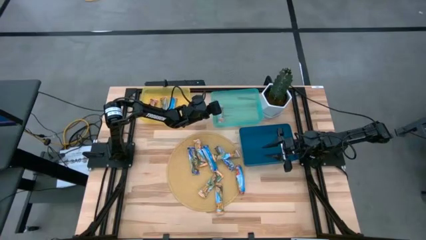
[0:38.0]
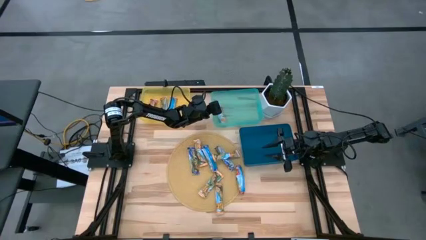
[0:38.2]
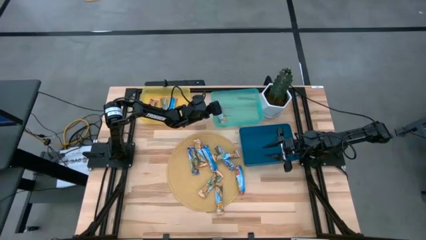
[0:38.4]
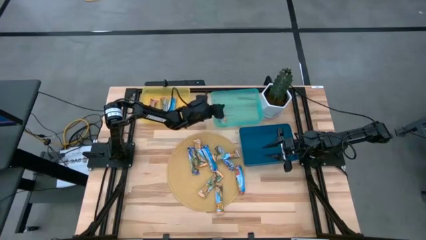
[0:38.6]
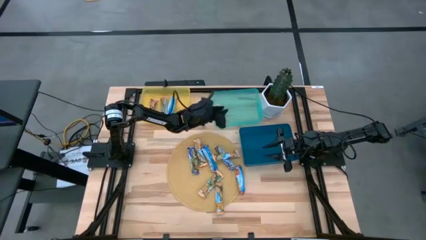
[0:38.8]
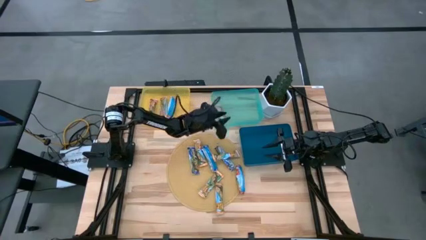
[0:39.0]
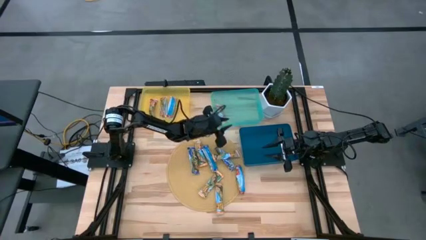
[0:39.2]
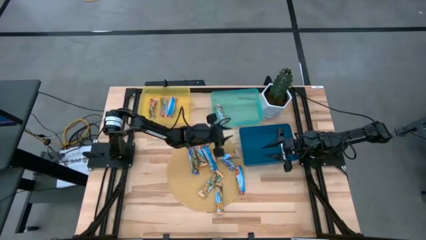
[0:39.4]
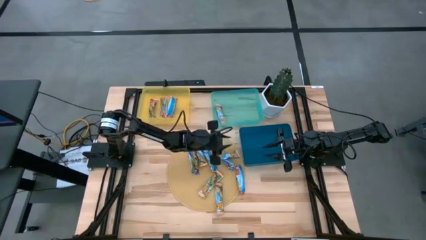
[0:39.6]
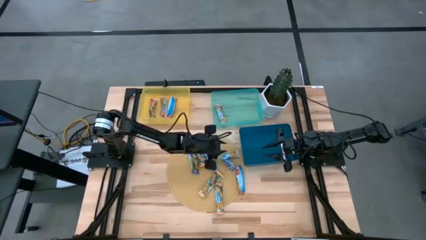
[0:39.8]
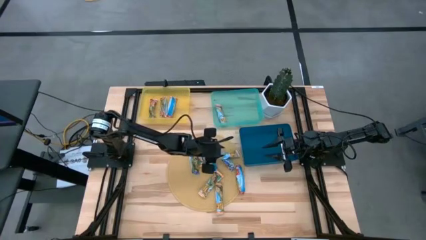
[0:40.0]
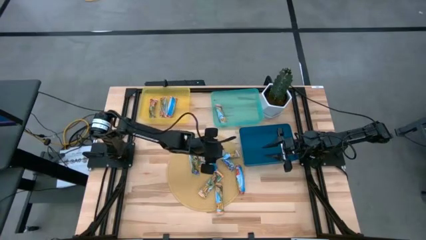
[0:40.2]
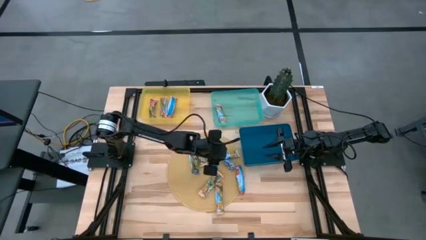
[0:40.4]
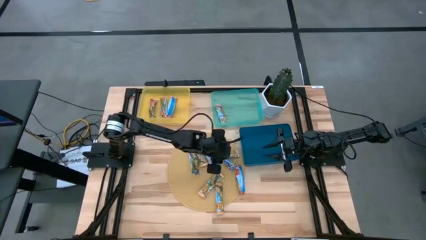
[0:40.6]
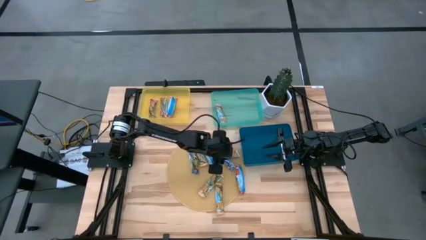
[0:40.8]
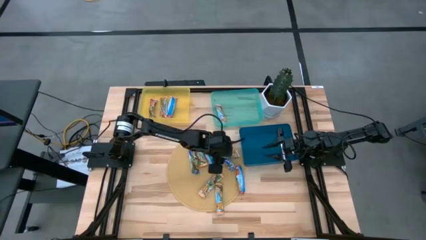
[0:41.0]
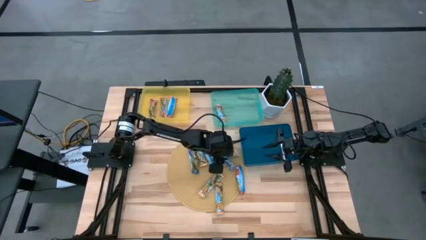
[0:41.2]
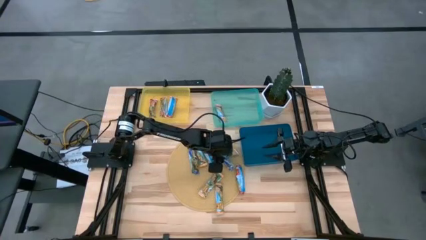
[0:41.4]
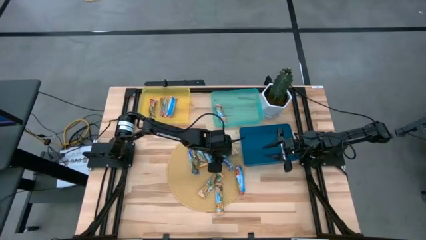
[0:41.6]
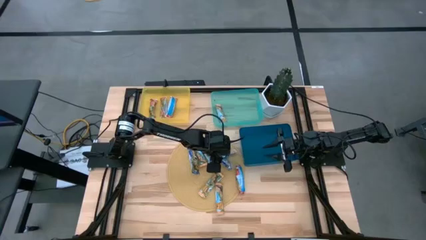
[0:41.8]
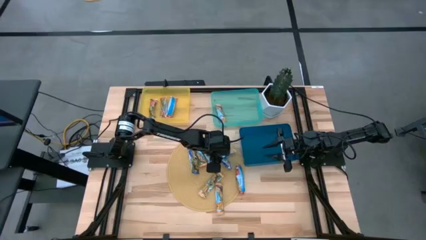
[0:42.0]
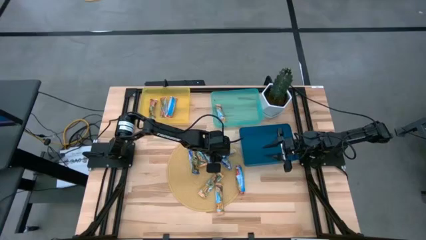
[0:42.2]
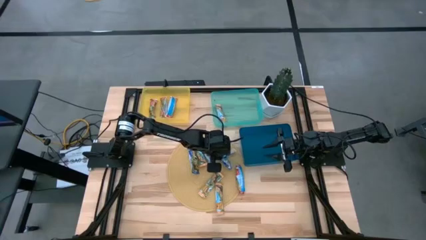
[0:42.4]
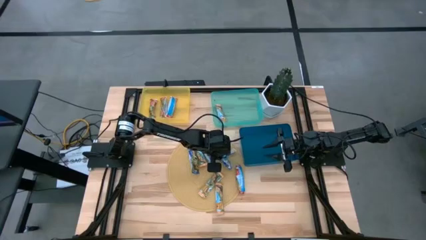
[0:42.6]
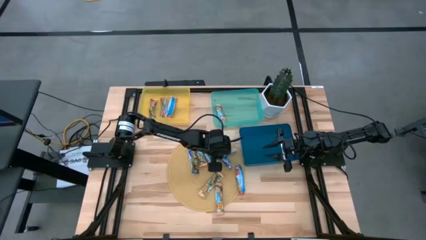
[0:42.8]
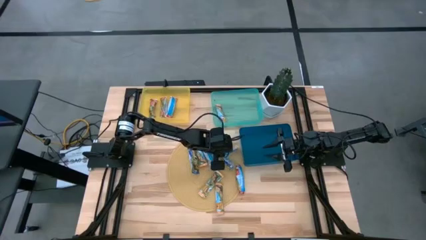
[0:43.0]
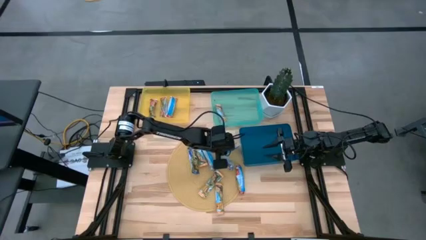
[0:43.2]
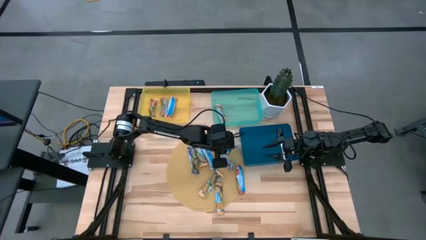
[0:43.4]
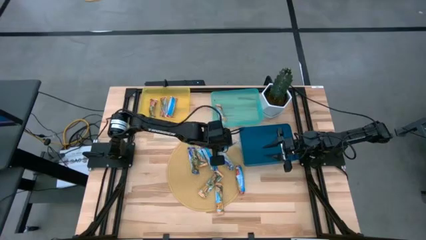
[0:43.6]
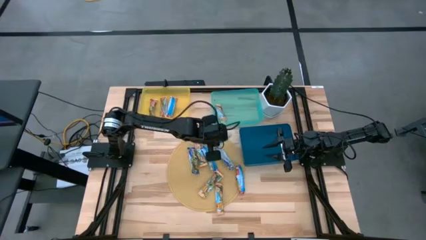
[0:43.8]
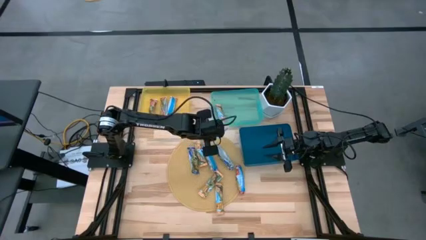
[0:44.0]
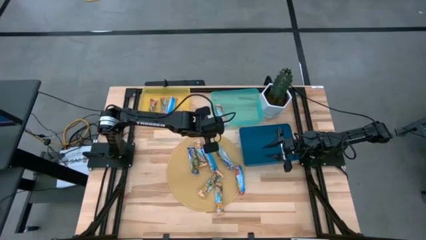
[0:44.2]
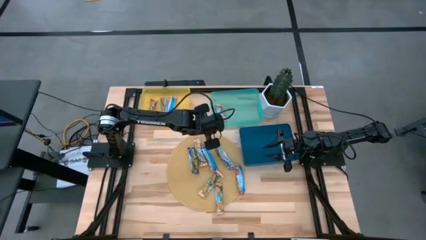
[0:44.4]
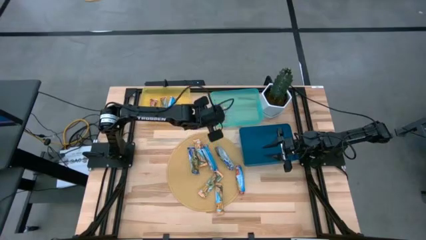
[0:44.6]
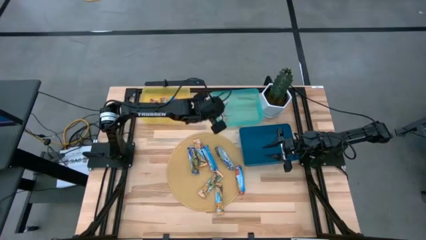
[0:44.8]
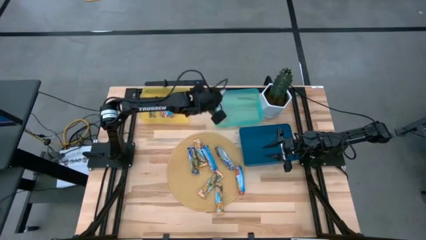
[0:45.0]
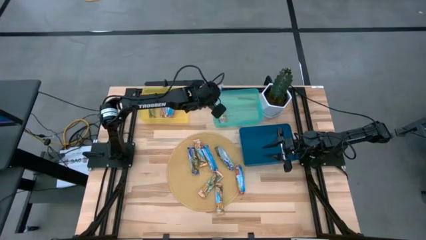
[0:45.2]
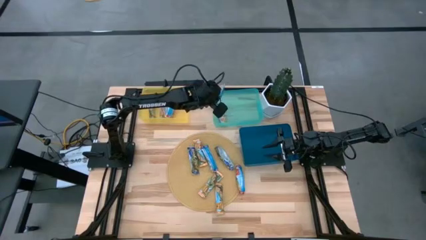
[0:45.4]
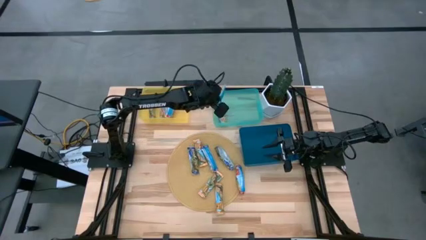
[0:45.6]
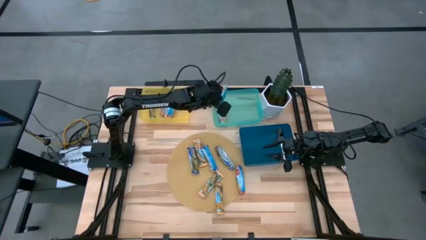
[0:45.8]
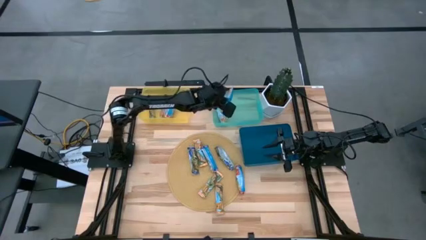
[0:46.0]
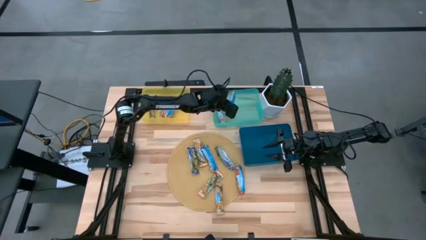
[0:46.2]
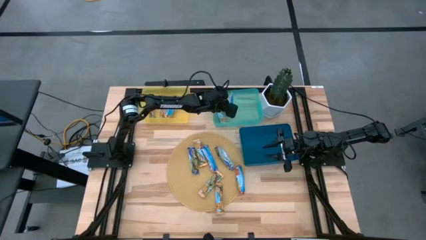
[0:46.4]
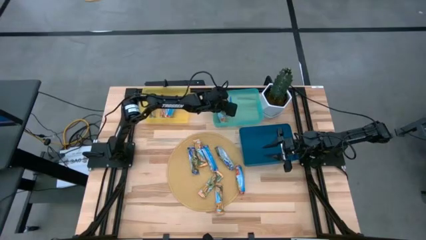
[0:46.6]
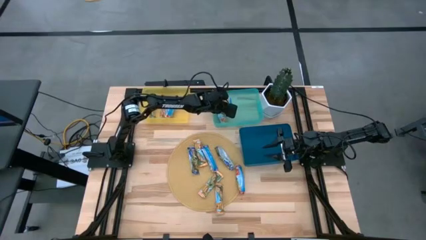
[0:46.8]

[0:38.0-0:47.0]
Task: Pick and place Granola Bars by type
Put the orange granola bar into the green bin

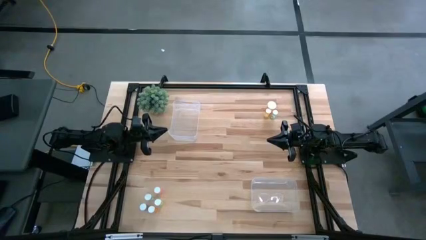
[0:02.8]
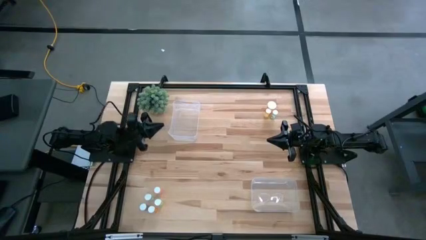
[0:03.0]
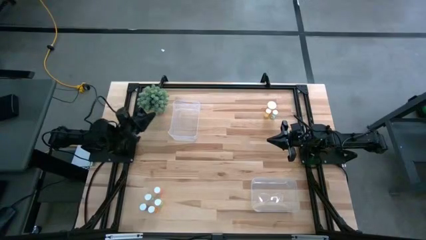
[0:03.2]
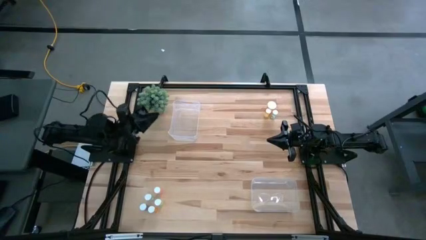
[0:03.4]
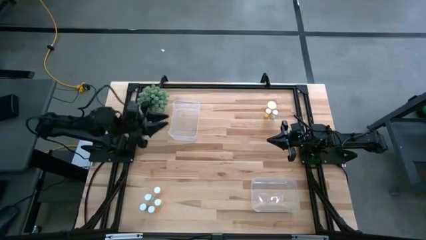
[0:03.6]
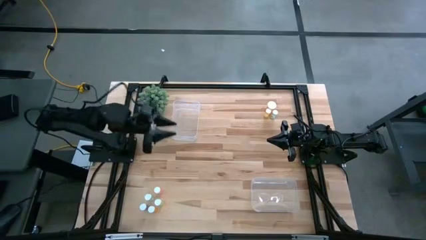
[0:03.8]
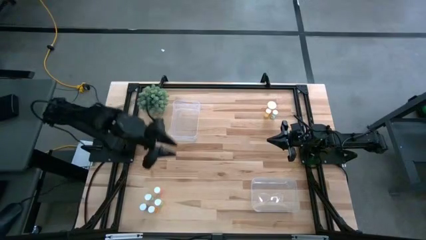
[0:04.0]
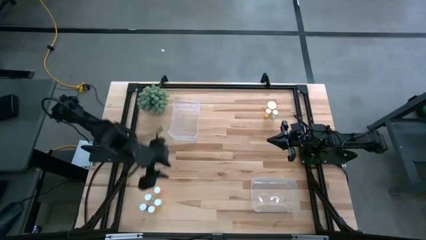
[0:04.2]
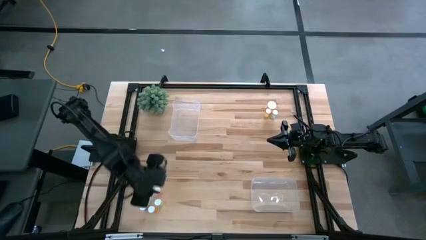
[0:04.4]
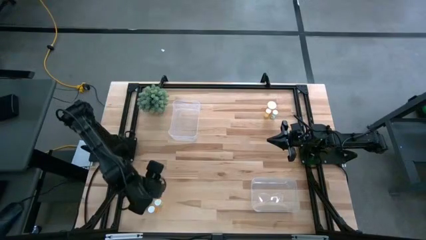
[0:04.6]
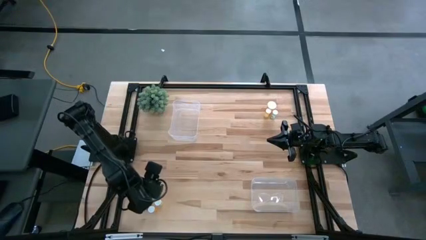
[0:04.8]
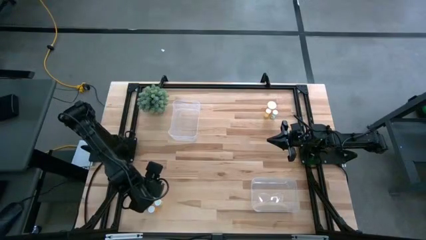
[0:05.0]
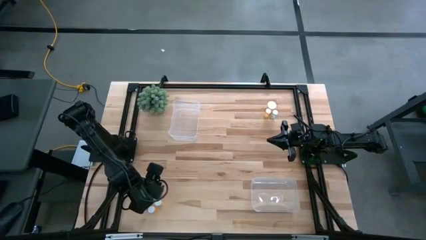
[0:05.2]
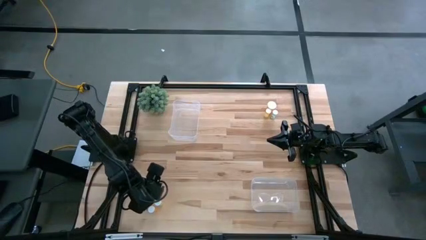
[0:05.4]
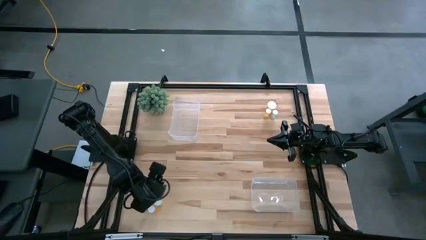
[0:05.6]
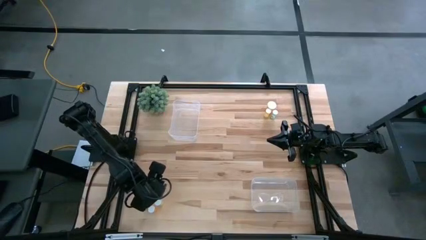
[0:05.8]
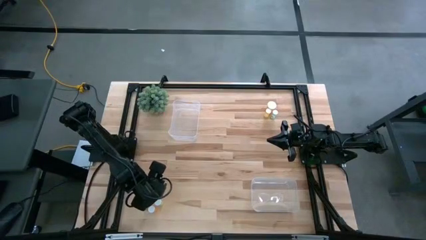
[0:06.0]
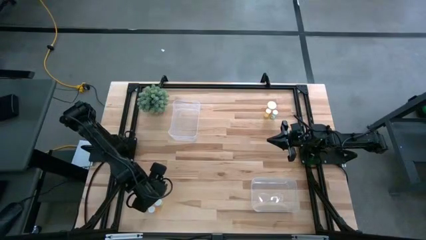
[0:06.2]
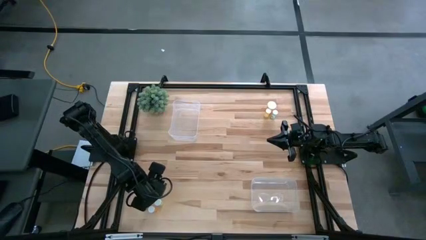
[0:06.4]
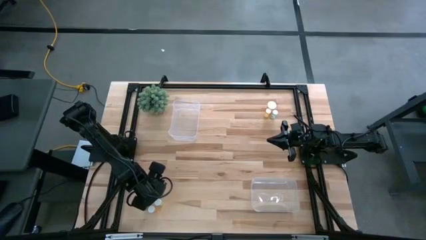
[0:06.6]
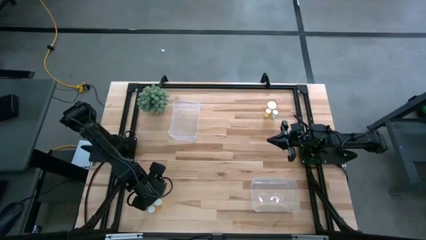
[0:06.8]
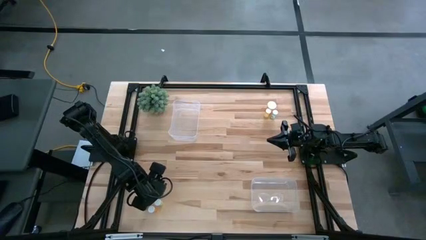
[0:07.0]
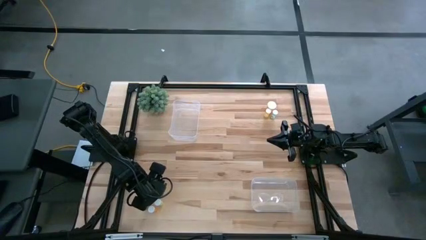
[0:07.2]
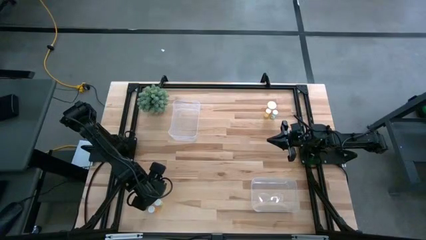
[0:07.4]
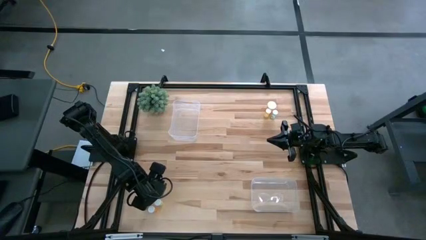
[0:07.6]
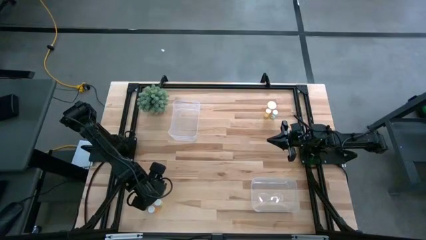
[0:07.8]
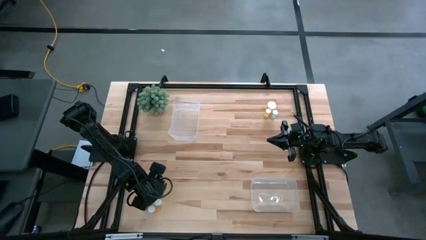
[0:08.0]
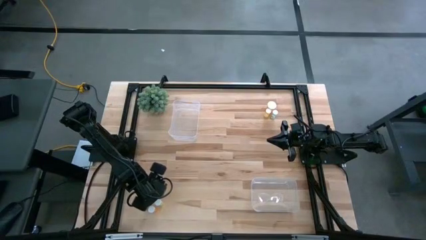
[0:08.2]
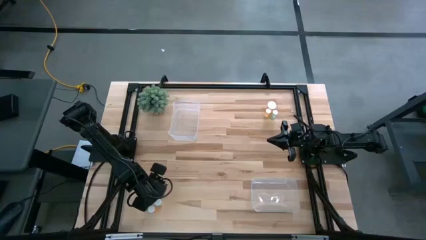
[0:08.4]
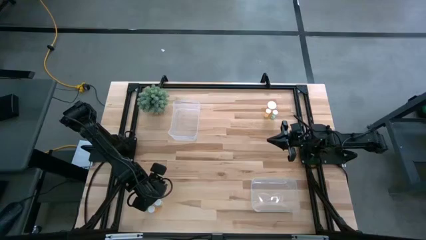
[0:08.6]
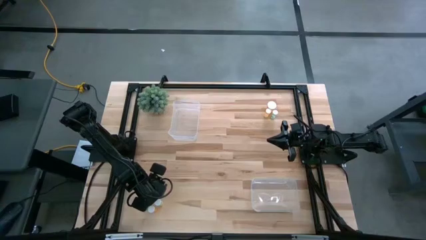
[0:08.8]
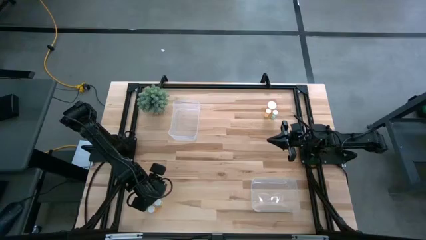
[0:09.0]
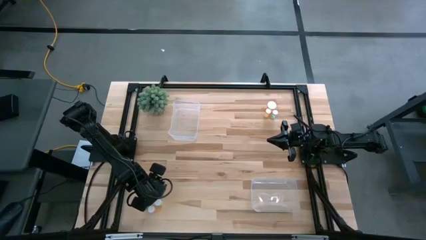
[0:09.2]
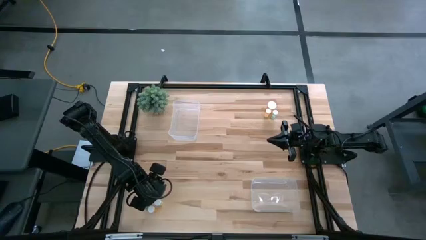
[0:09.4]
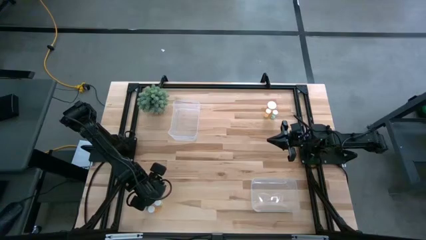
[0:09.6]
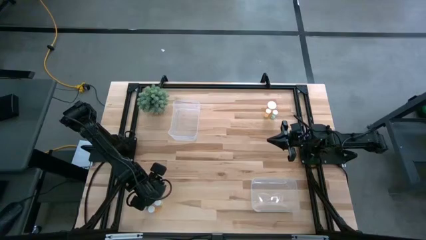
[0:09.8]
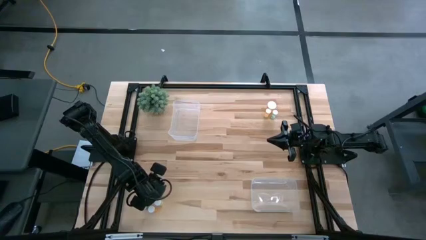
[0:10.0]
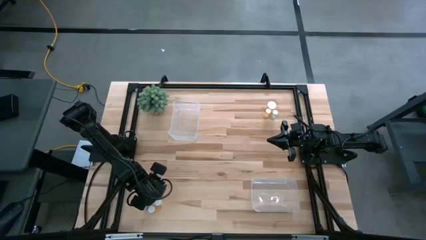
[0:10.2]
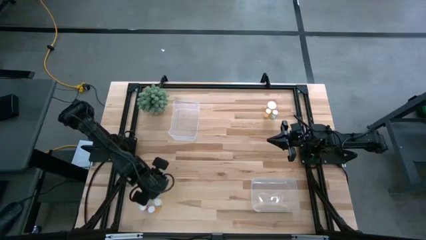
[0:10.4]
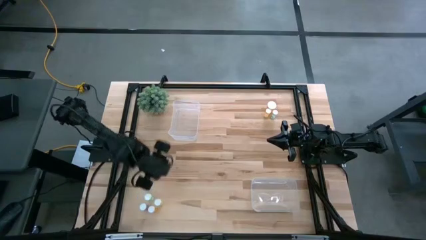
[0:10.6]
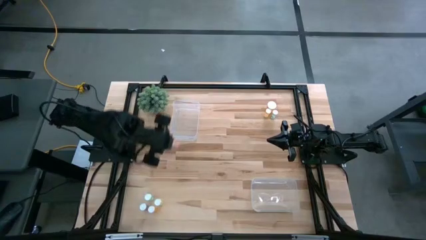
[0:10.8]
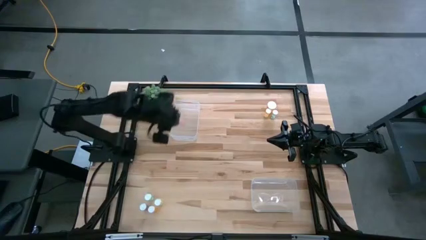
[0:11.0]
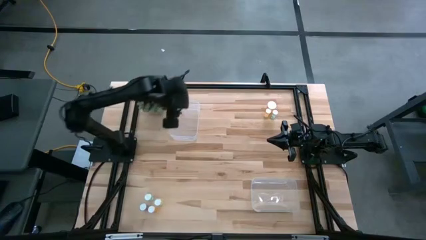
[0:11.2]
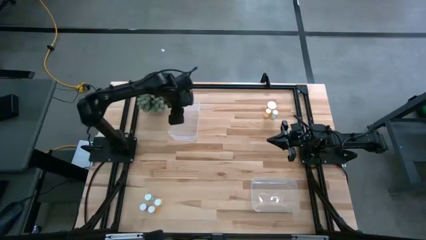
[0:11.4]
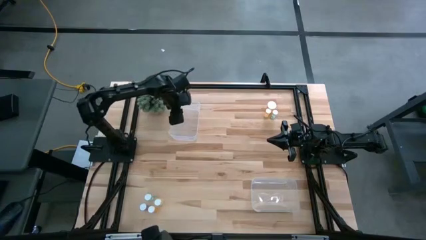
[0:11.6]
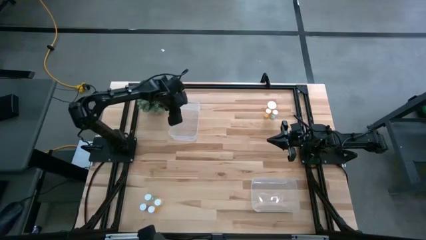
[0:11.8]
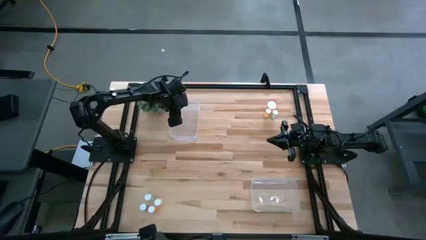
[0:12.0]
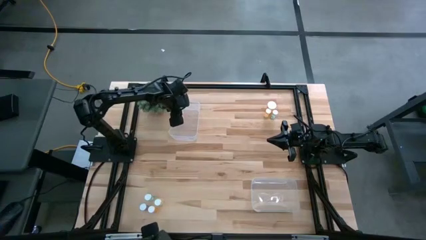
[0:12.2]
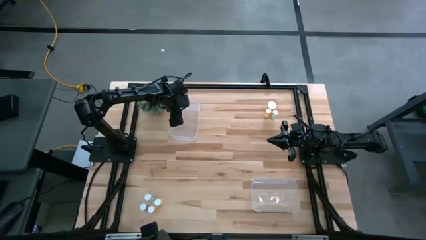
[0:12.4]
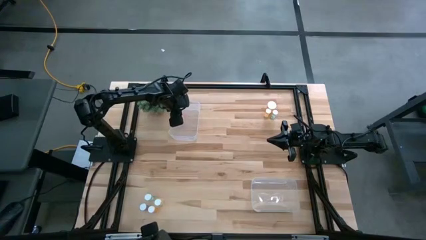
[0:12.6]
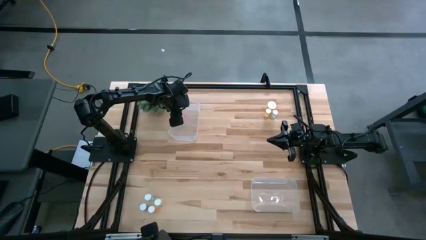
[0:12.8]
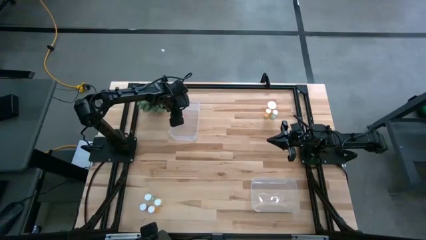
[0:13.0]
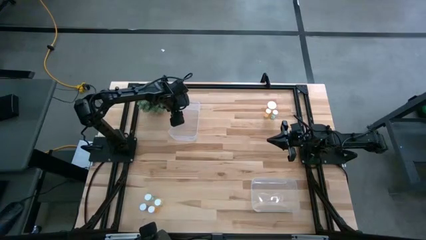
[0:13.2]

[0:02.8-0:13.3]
Task: Pick and place medicine bottles into bin by pill shape (circle, oval)
Put the pink tablet bottle into the top transparent bin
